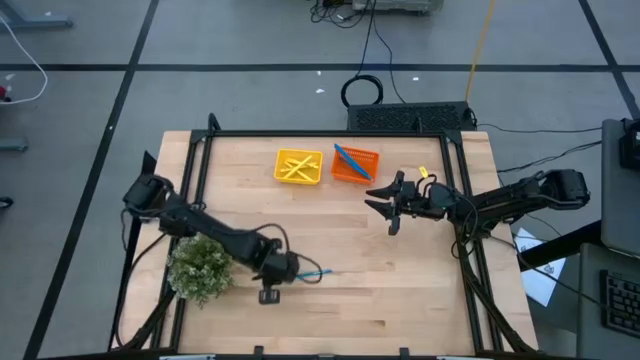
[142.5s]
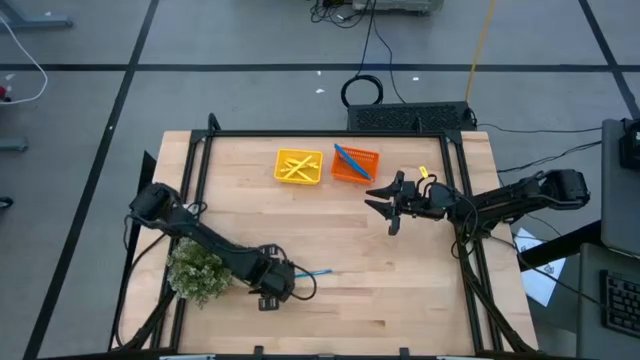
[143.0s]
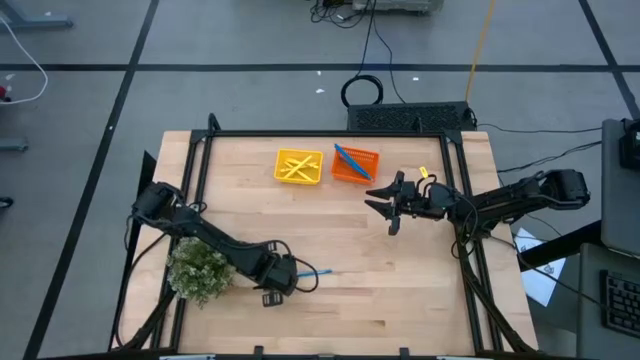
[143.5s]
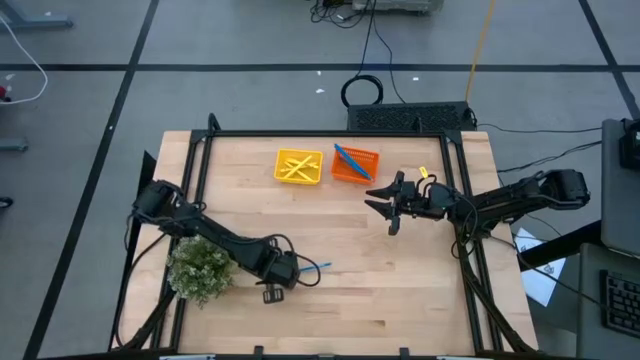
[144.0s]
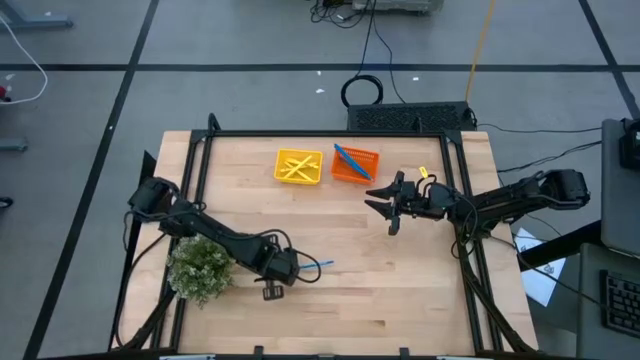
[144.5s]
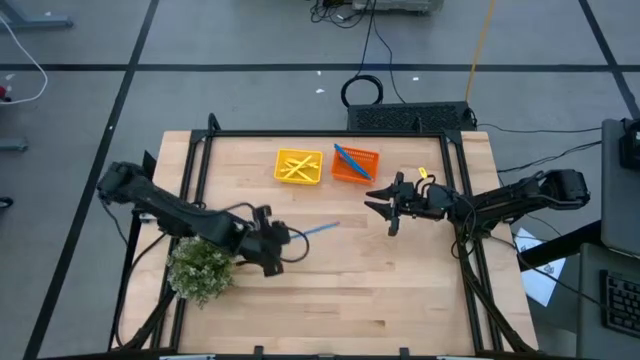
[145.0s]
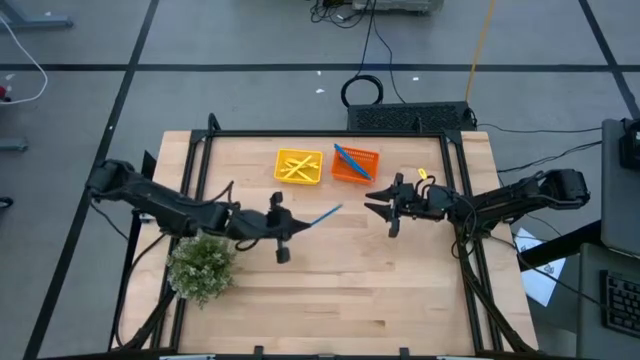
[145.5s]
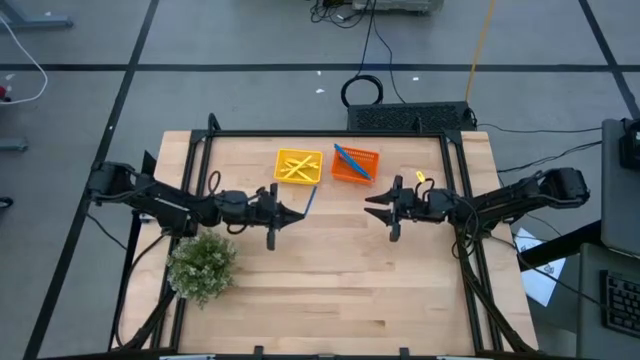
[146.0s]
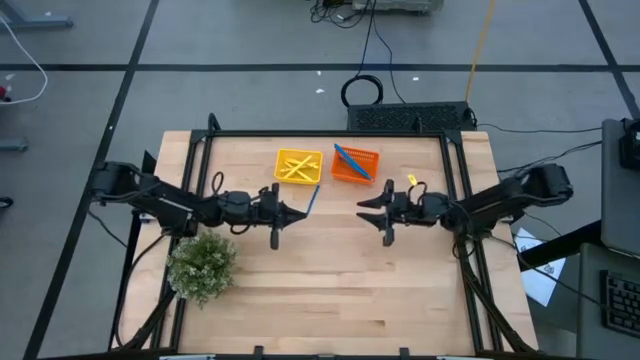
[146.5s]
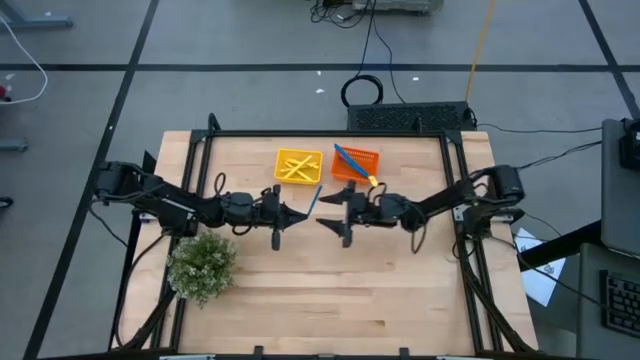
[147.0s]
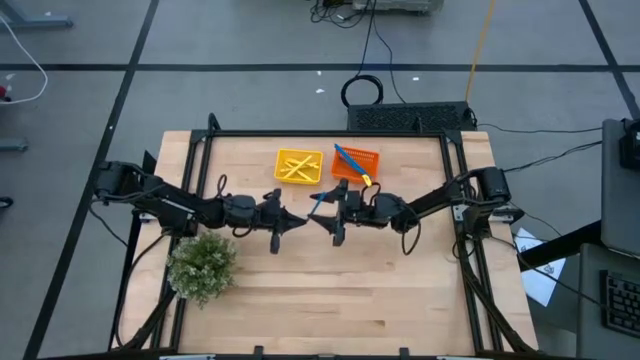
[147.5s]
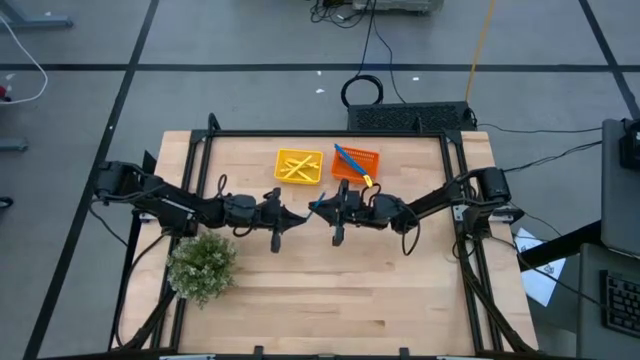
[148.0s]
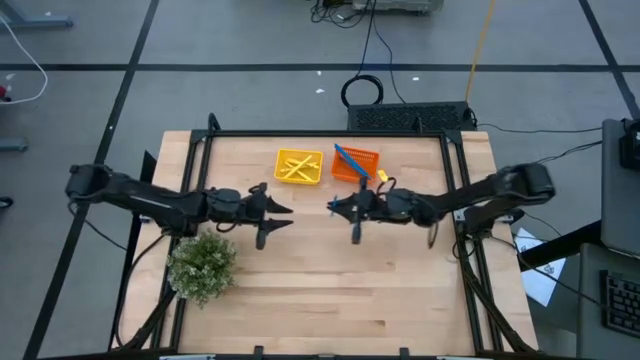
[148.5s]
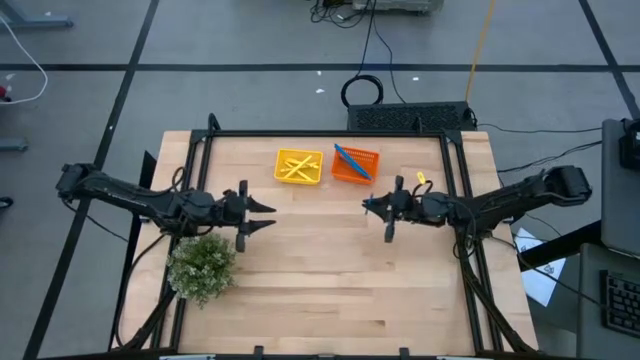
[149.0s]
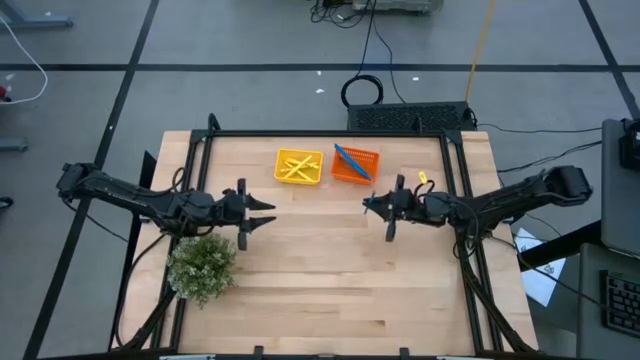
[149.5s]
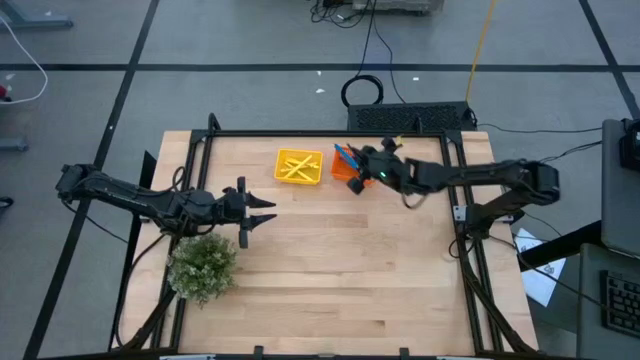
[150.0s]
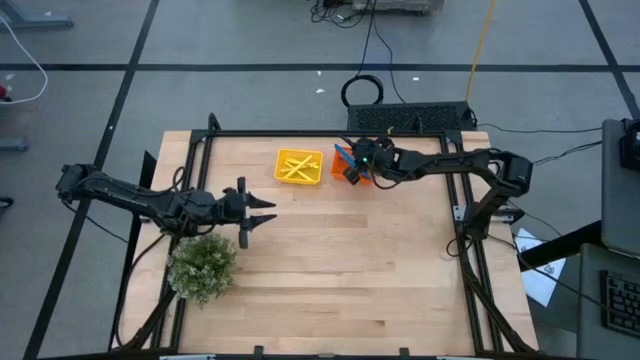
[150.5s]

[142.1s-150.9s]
Task: Sort pens & pencils
Put the blue pencil into the orange bin

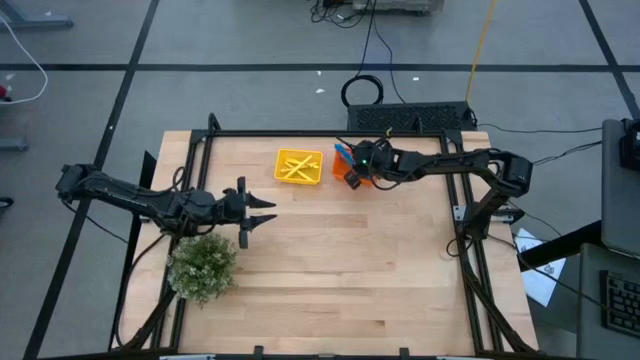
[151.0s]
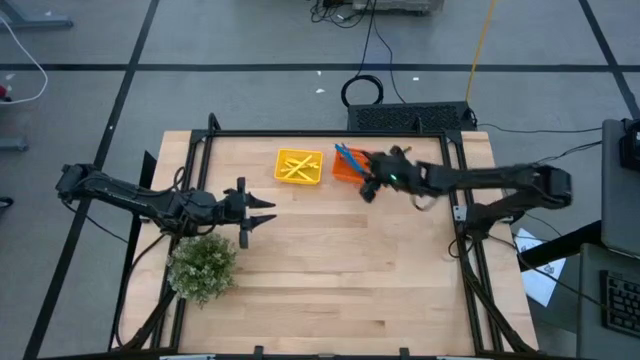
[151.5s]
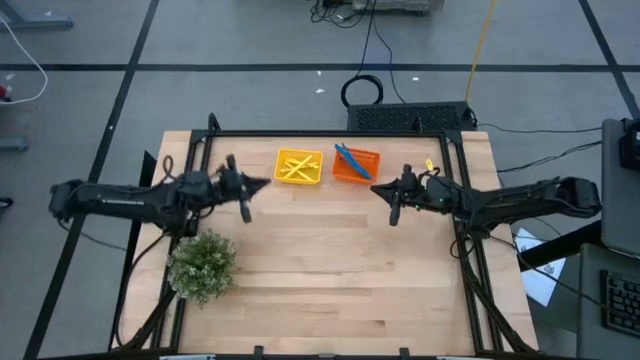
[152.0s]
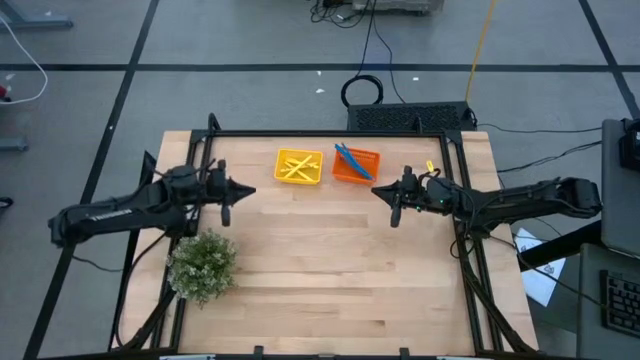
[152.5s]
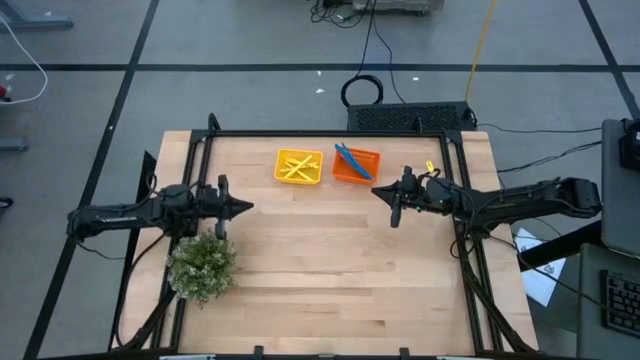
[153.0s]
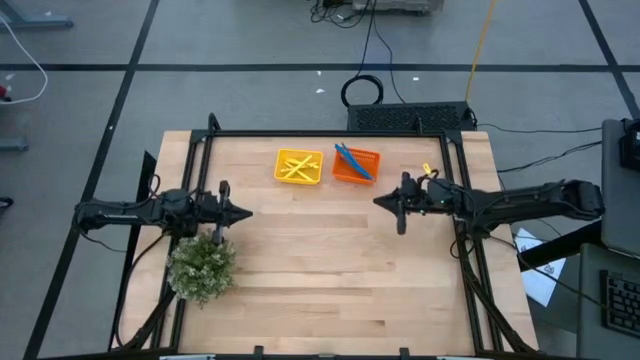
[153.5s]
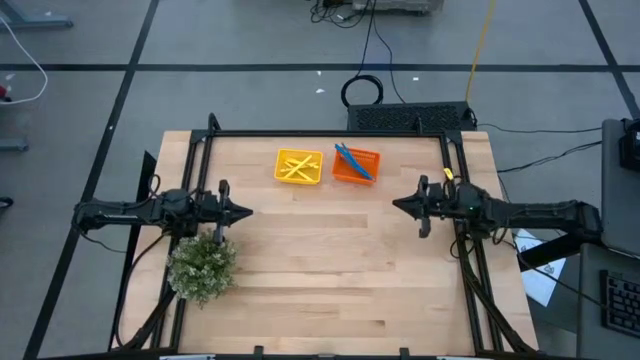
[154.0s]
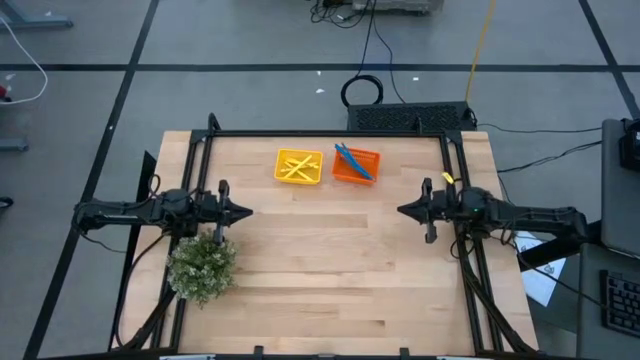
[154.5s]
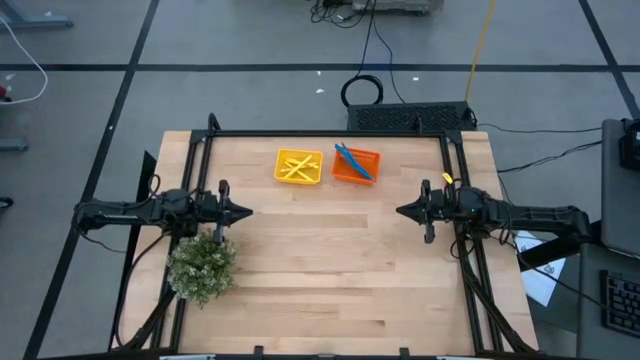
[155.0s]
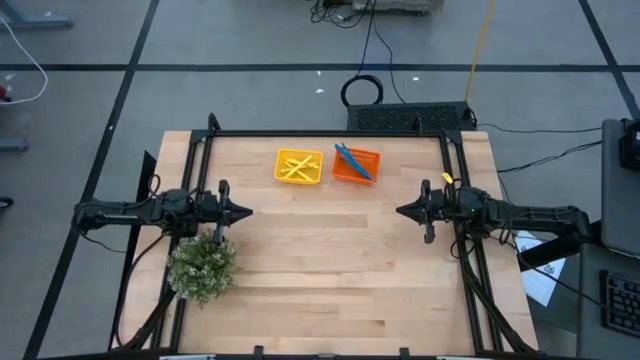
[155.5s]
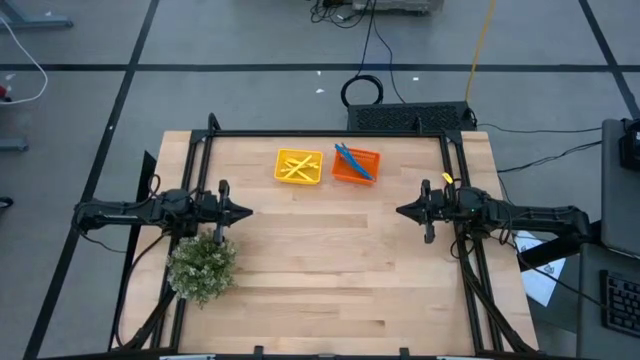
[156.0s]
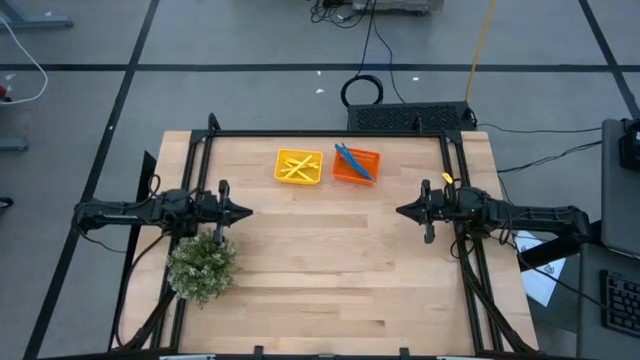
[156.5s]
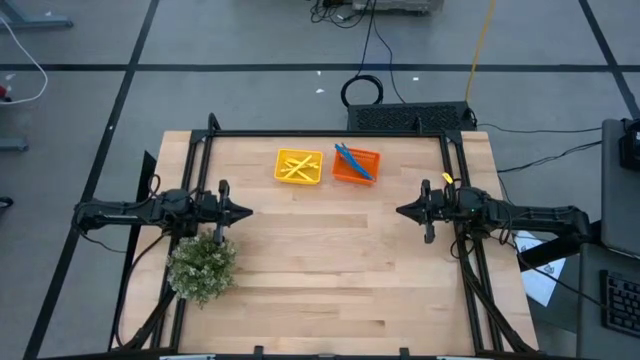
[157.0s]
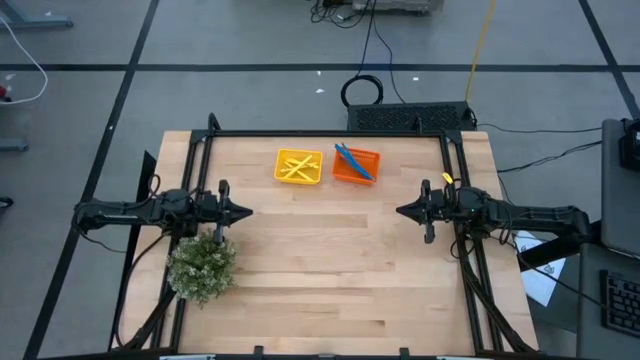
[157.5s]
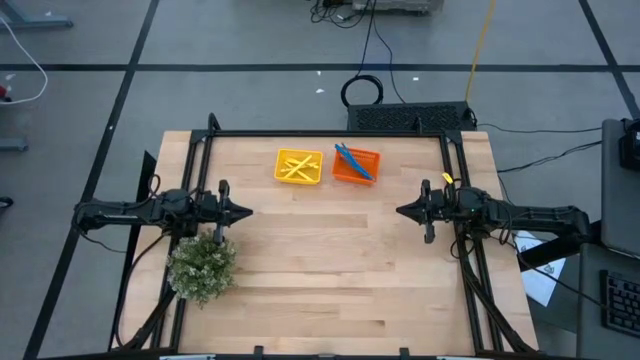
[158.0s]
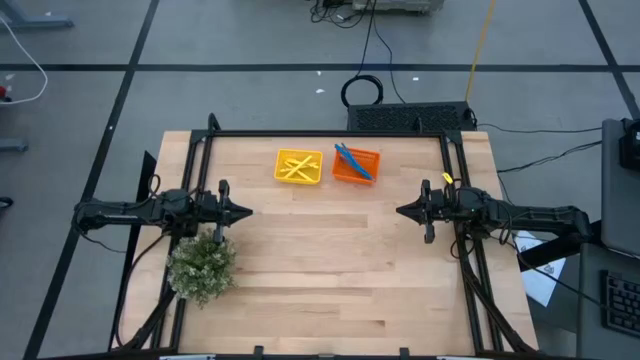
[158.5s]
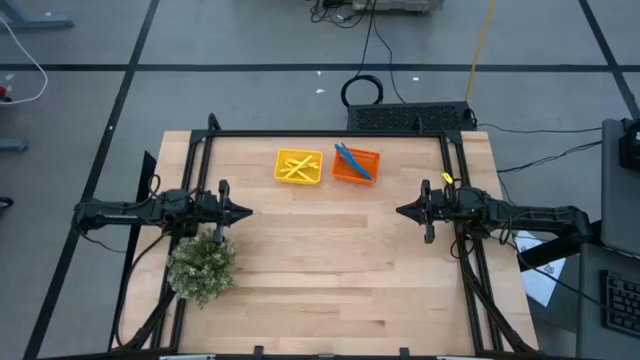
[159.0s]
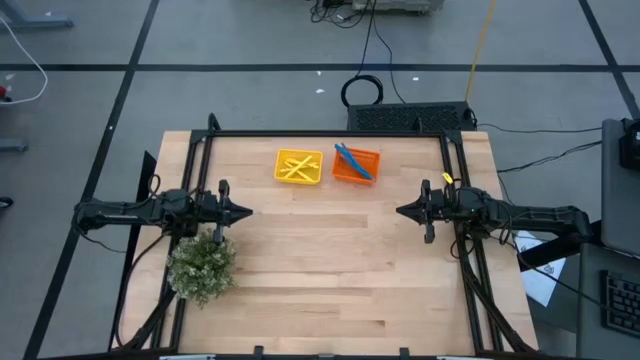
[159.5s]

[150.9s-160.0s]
Return to Home Position

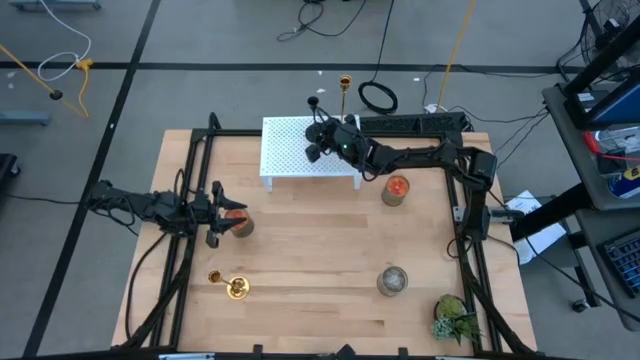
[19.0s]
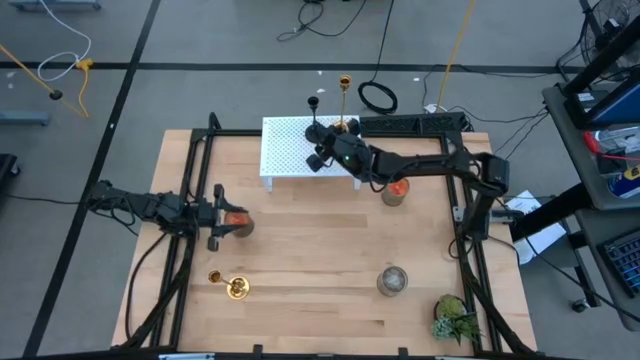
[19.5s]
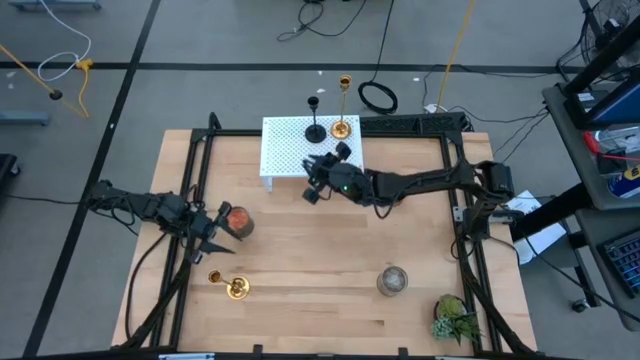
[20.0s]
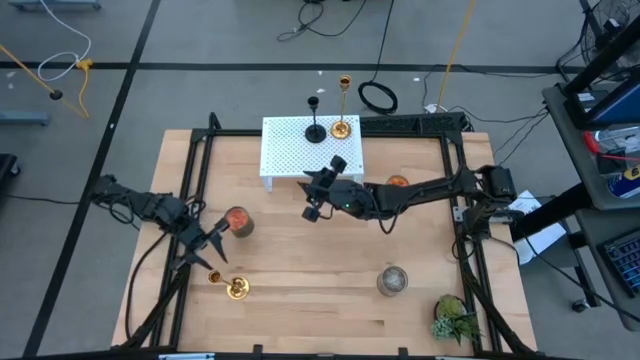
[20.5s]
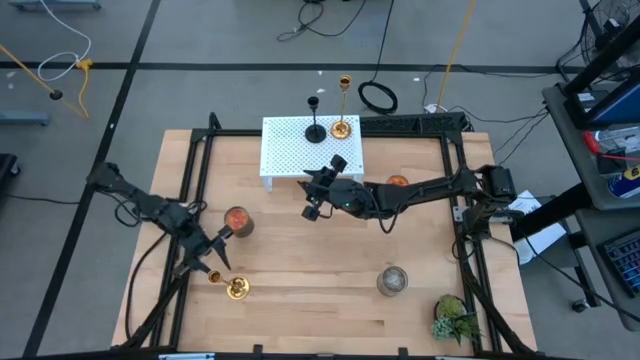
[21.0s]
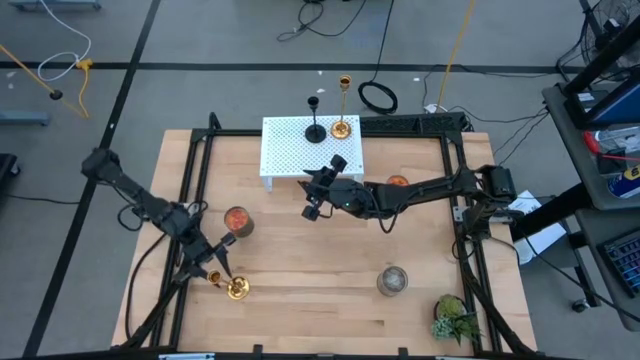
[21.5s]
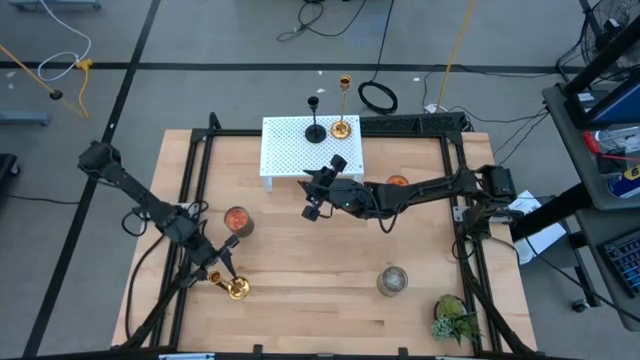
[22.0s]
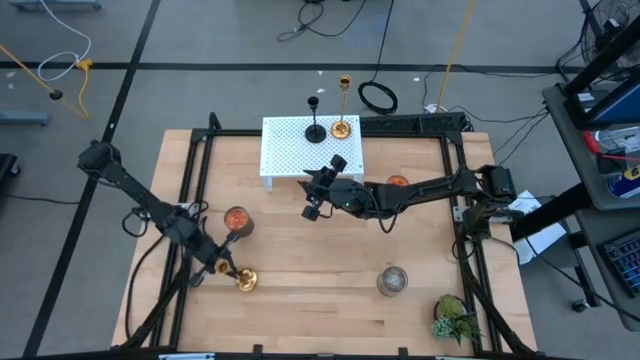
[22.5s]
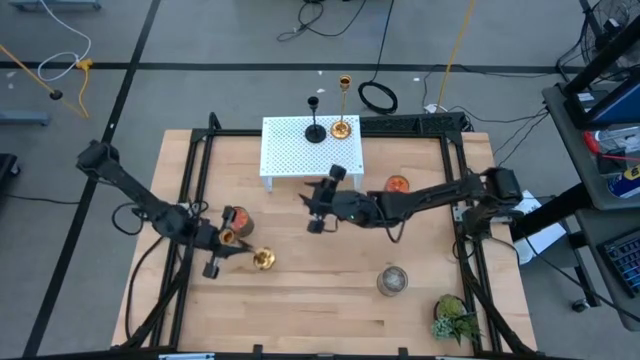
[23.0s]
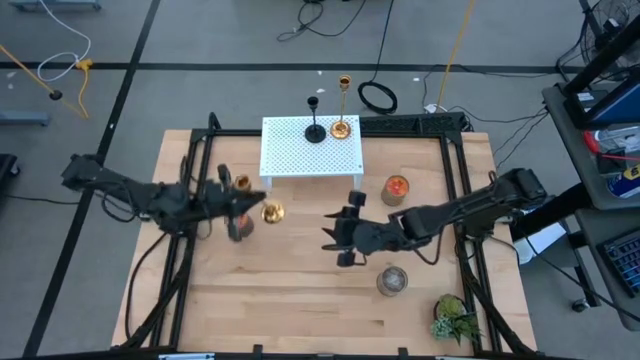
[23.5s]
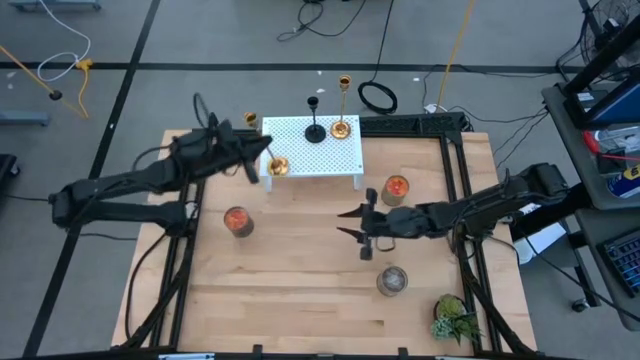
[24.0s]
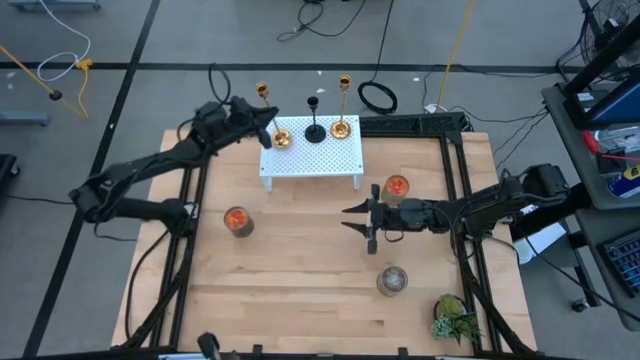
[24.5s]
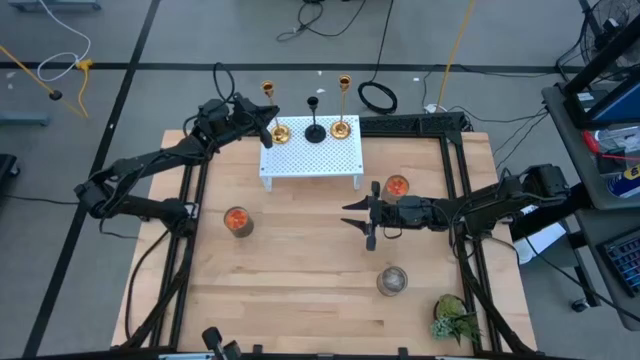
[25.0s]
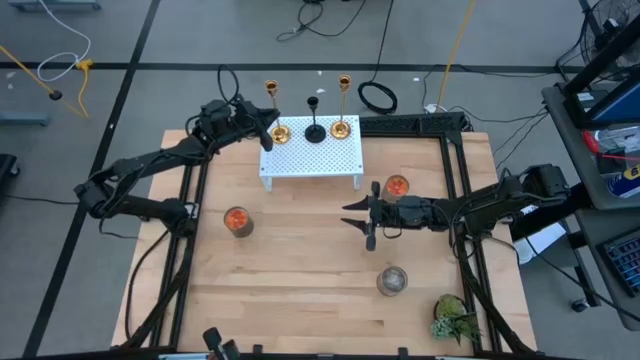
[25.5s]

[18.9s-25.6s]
Task: Pick & Place candle stick holders
Put the gold candleholder on the shelf
